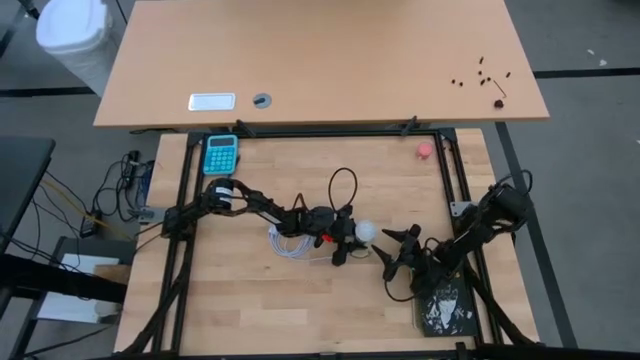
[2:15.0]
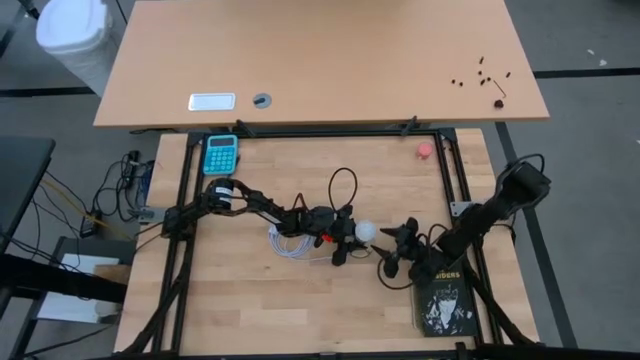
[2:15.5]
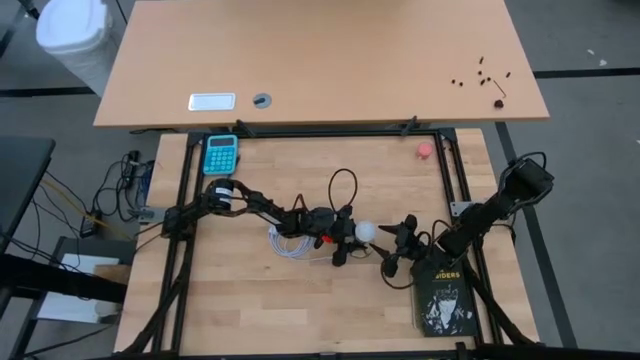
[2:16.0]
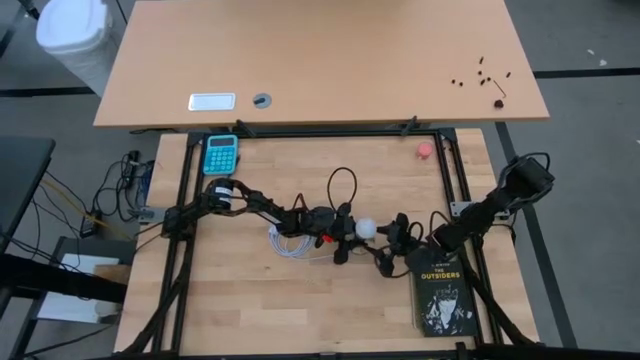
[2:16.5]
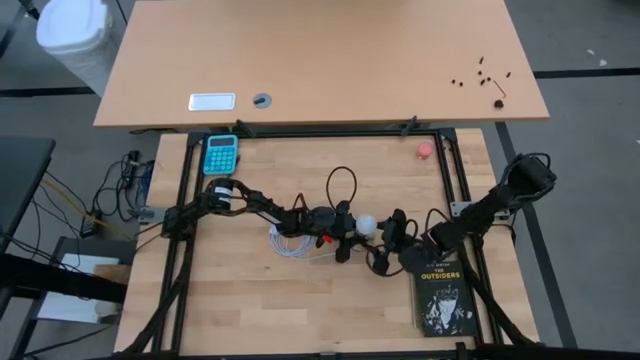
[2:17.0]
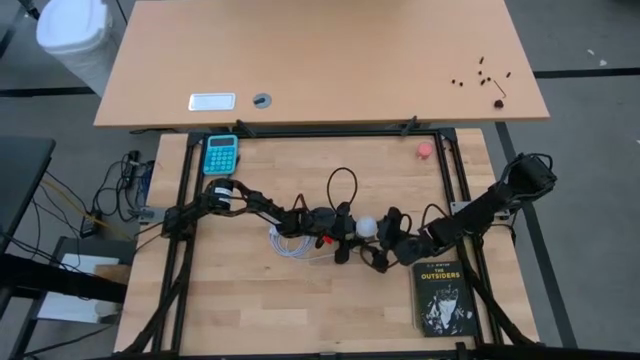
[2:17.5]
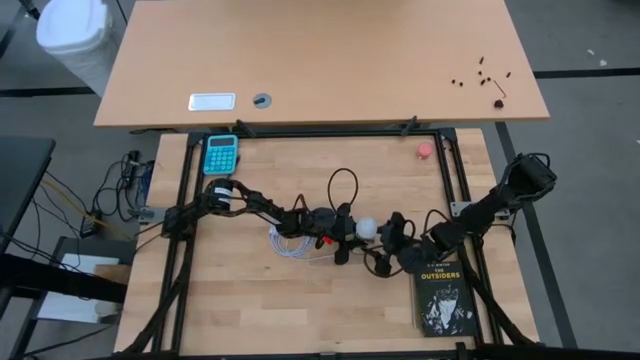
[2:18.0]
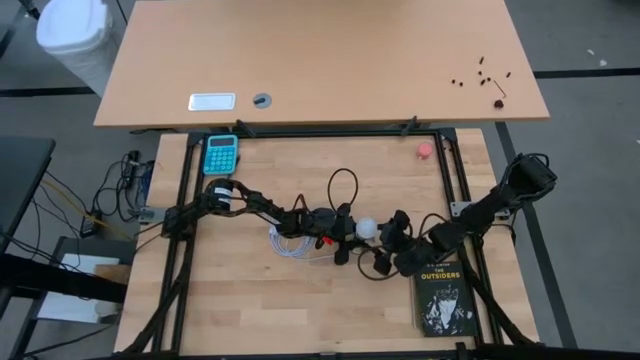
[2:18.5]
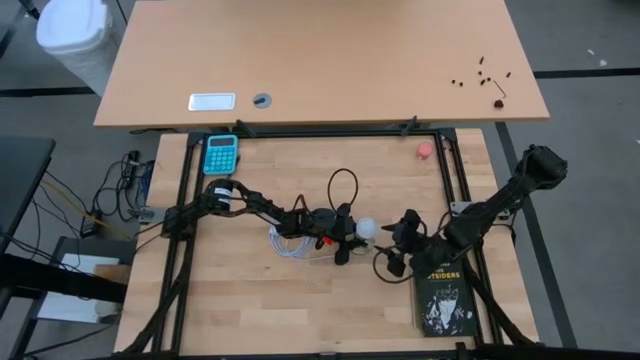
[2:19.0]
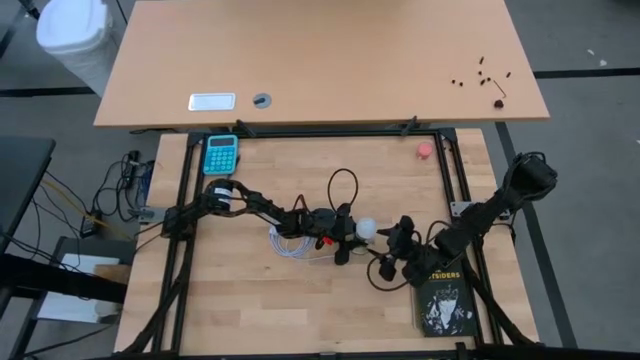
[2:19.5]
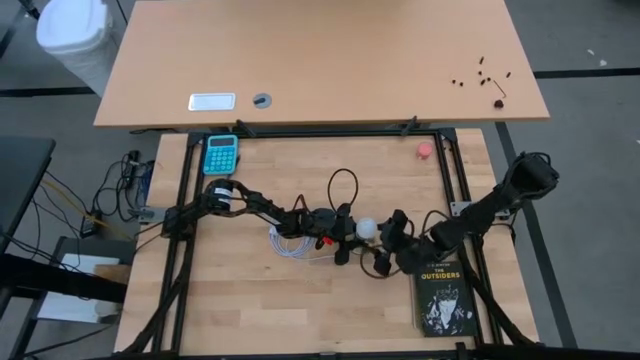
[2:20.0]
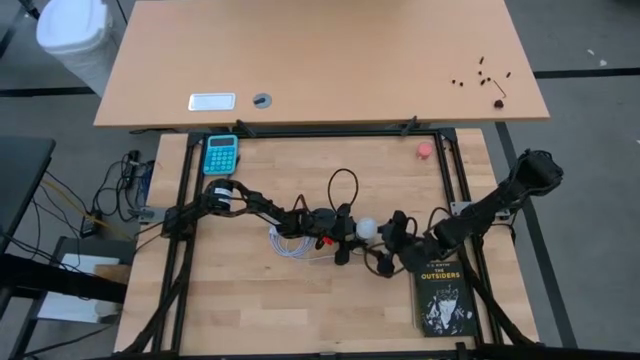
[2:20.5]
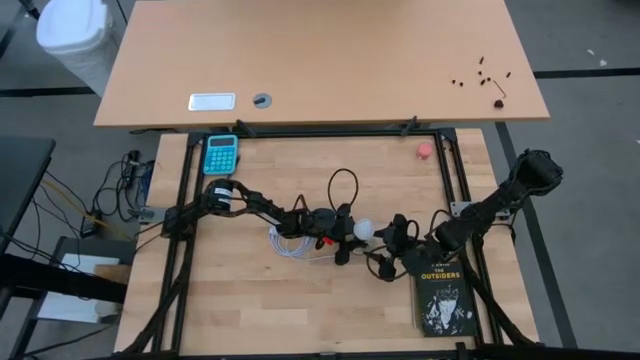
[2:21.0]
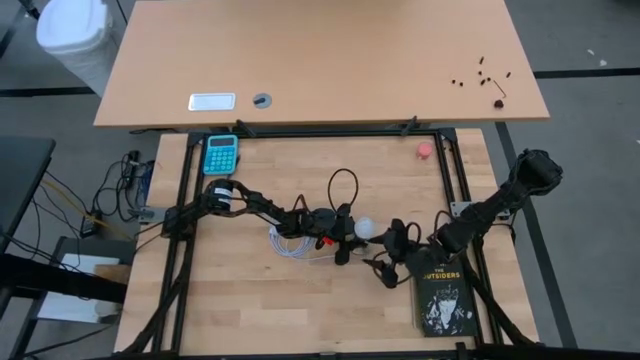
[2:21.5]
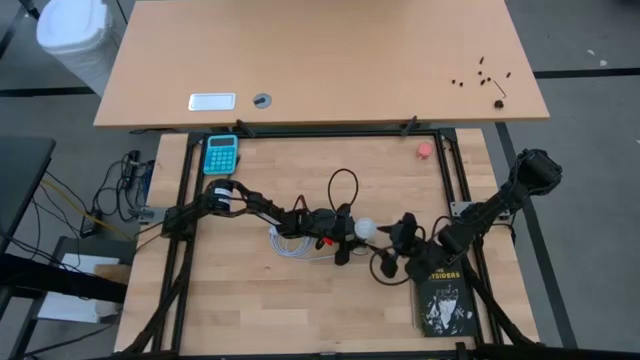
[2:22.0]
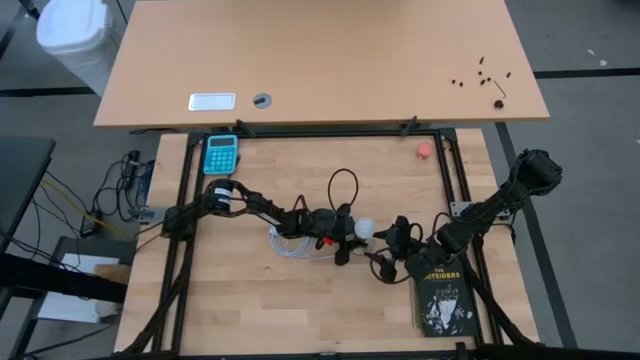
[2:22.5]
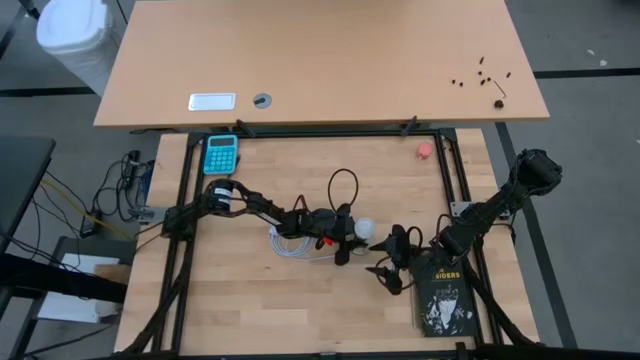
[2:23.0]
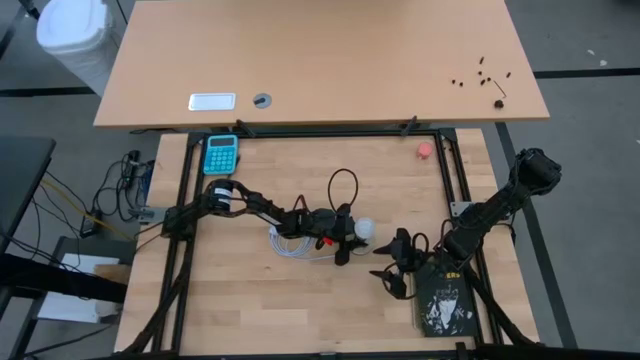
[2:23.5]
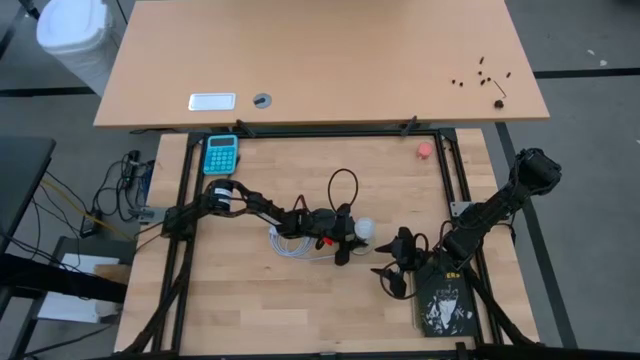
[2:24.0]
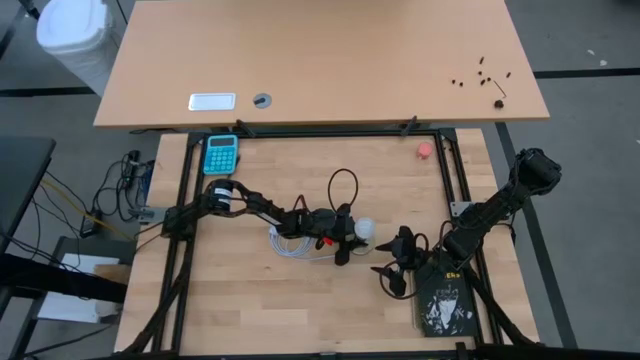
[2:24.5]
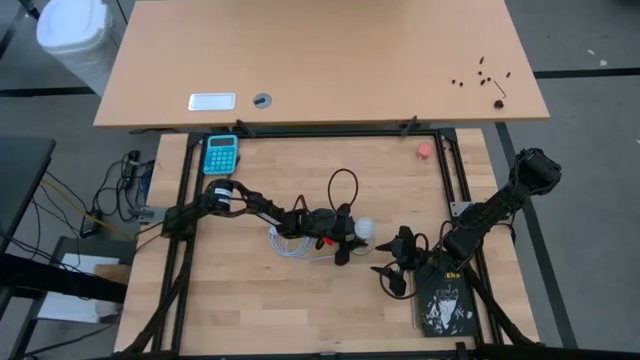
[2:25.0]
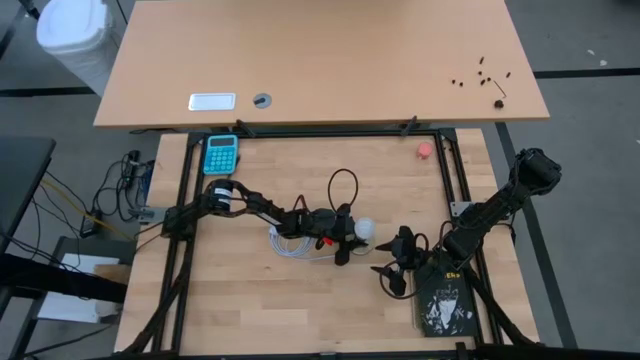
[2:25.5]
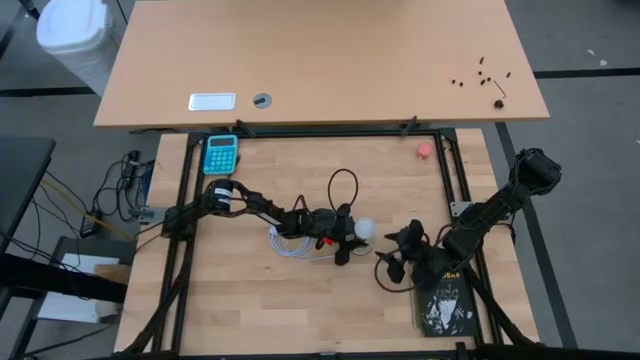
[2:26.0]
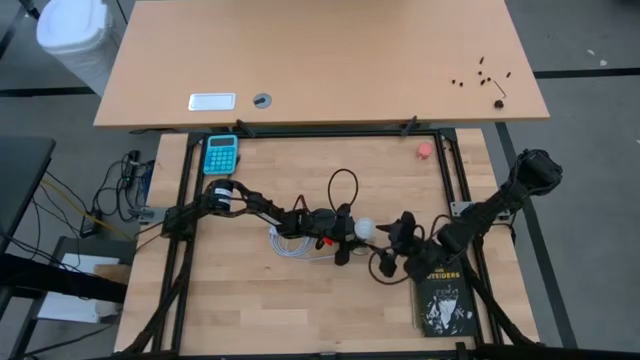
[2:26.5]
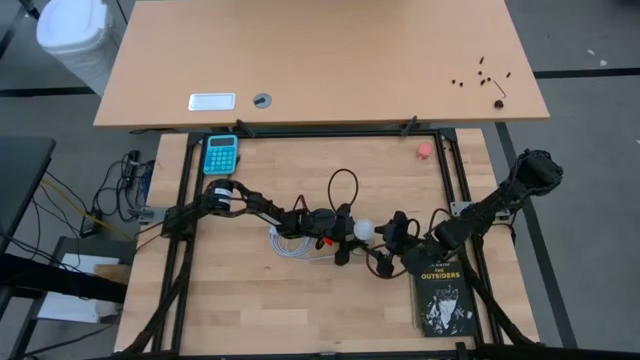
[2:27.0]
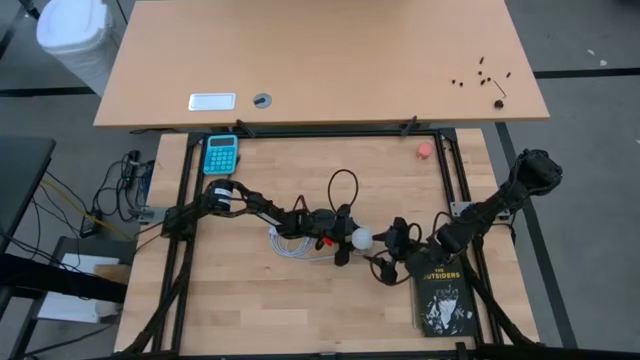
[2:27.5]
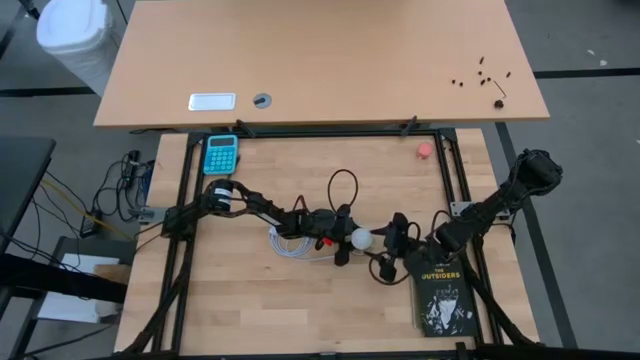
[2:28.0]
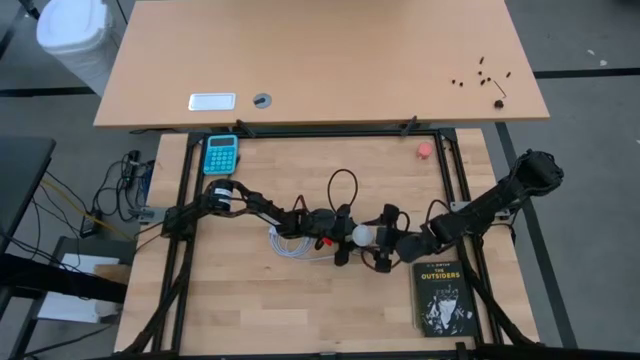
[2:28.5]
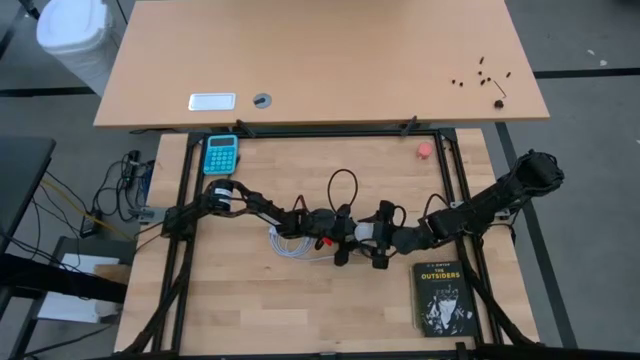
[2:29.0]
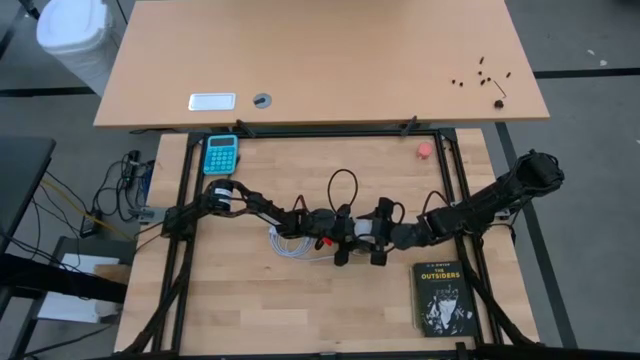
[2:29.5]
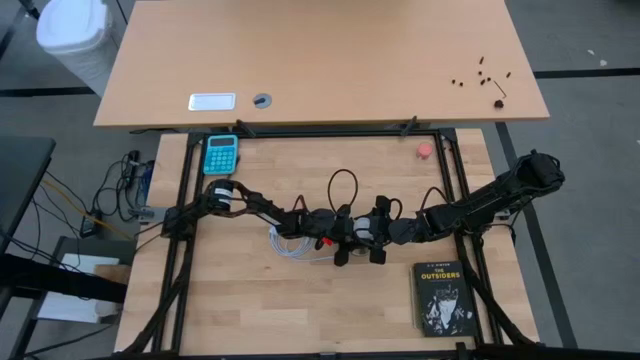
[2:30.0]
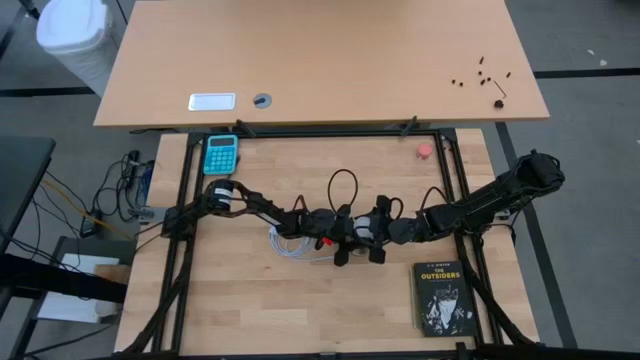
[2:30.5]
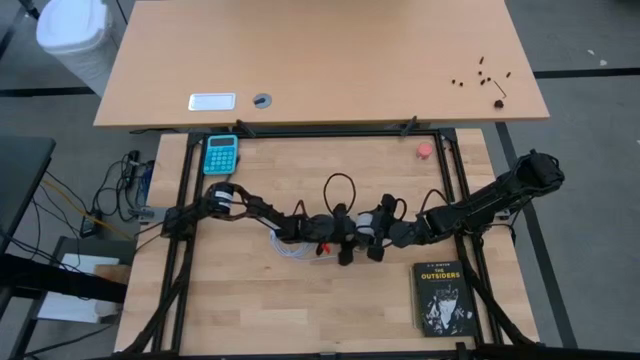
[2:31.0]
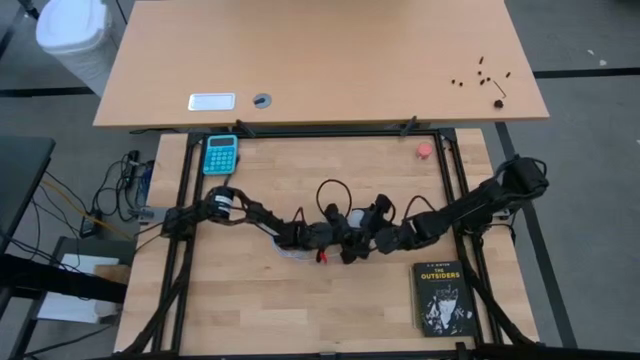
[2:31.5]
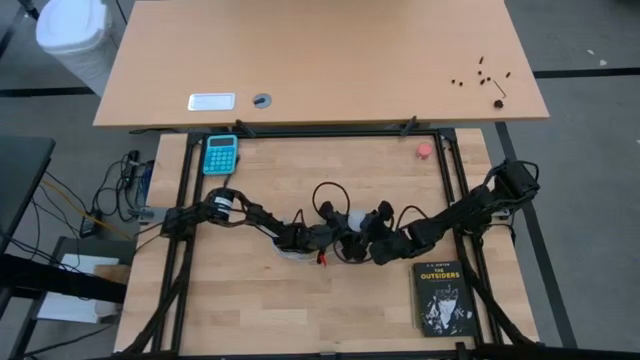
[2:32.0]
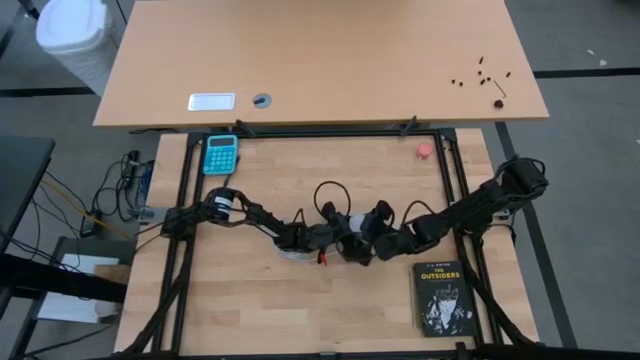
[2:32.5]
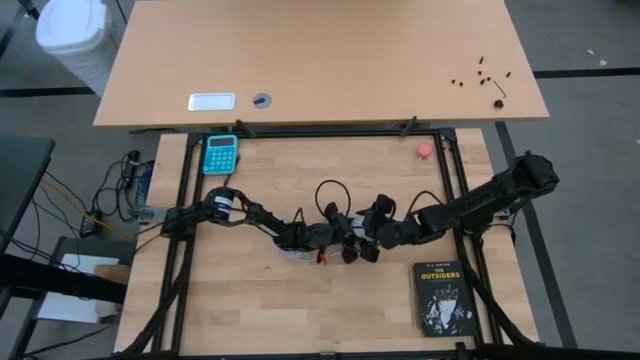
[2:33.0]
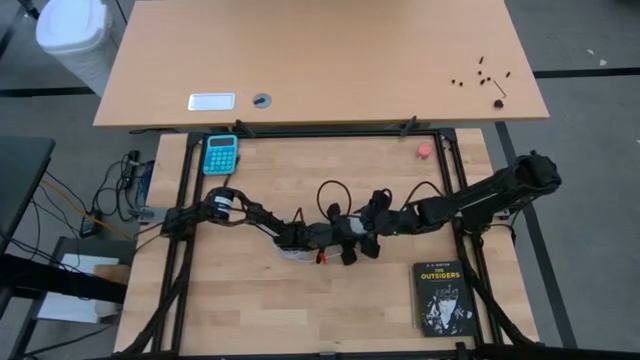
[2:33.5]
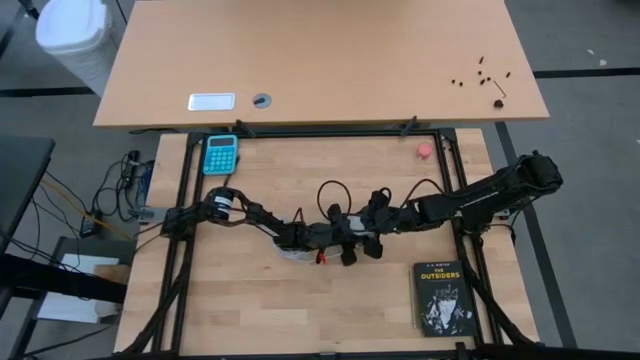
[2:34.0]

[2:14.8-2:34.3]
Task: Screw lightbulb
Insert the lightbulb into the lamp

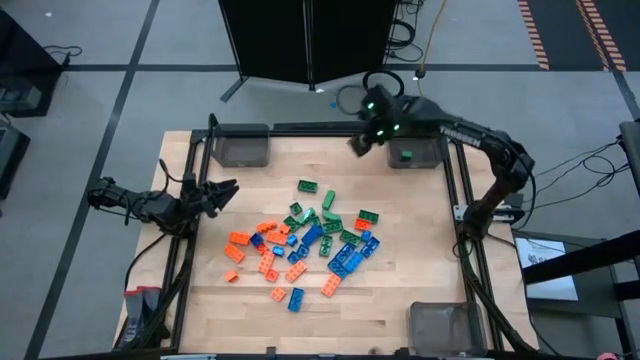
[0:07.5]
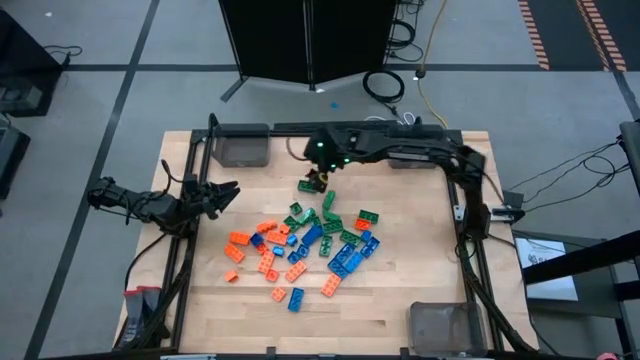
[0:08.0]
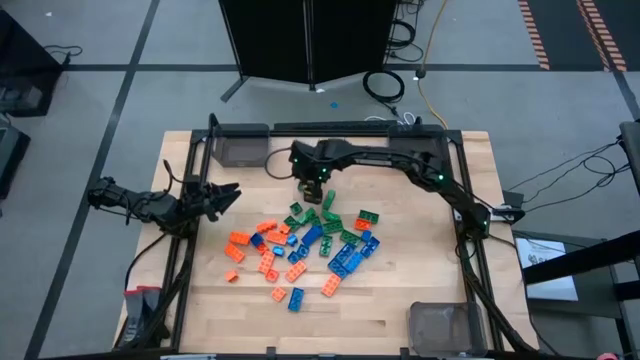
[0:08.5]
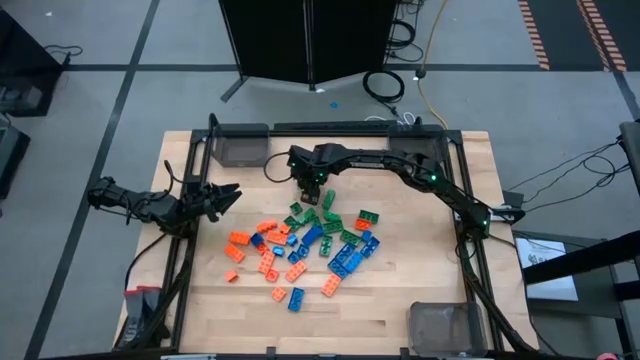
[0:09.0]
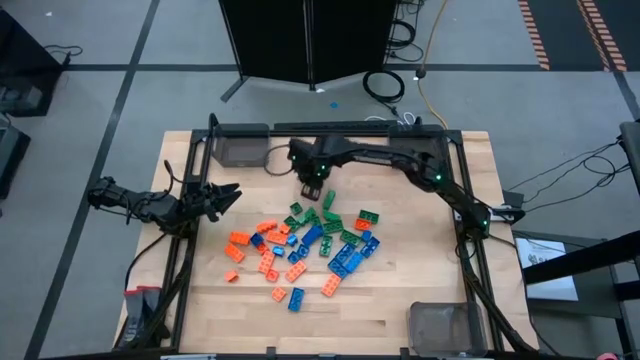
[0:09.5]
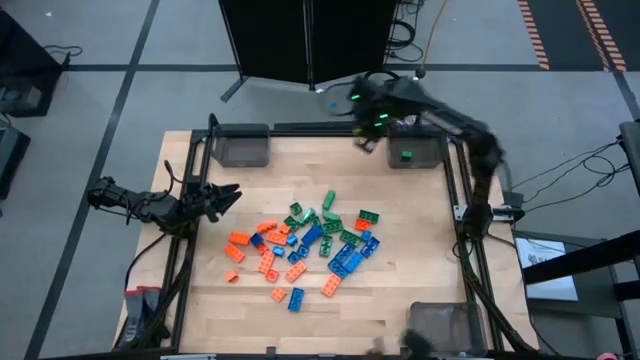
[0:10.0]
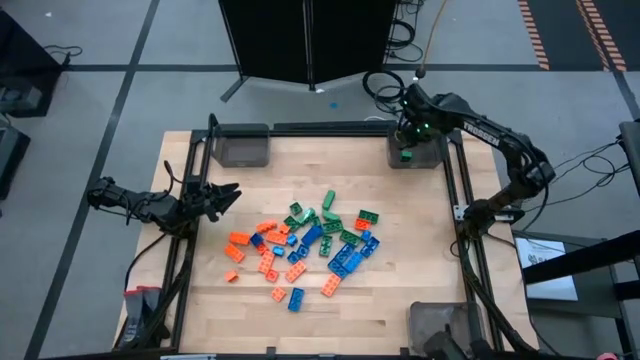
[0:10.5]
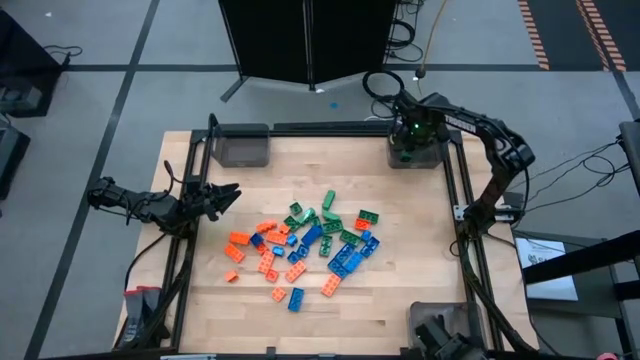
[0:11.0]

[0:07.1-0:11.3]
Task: Sort blocks
Put the green game piece into the top right black bin
